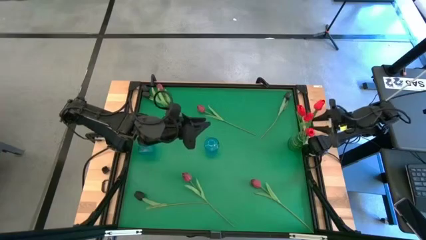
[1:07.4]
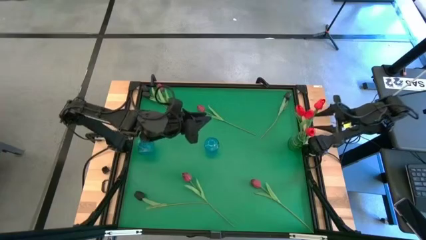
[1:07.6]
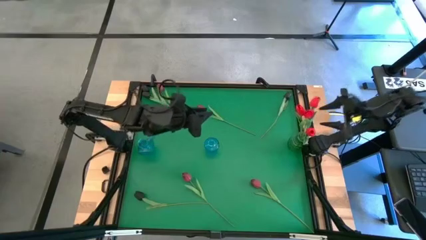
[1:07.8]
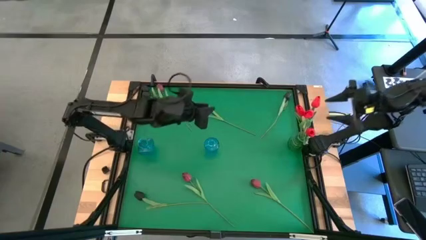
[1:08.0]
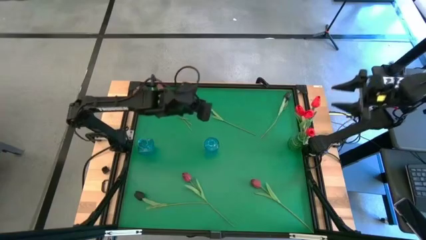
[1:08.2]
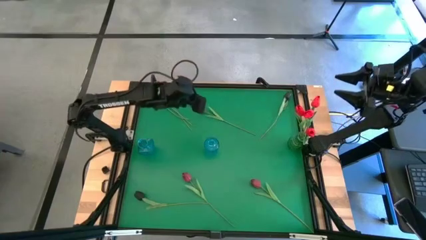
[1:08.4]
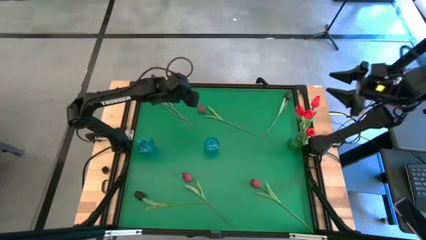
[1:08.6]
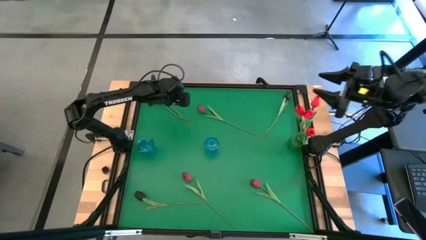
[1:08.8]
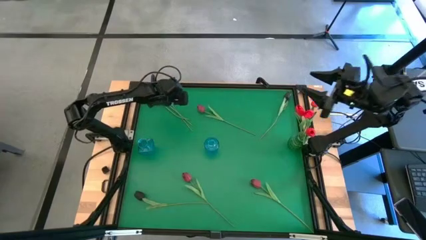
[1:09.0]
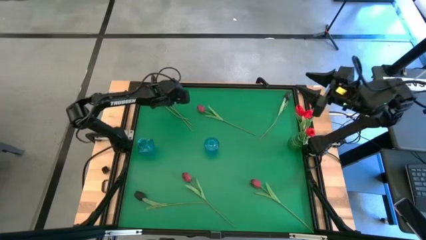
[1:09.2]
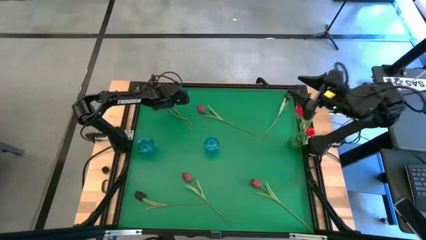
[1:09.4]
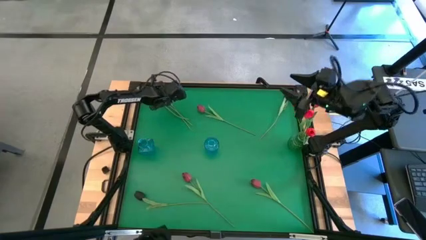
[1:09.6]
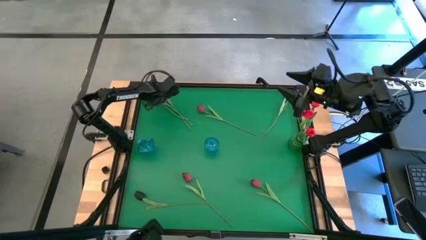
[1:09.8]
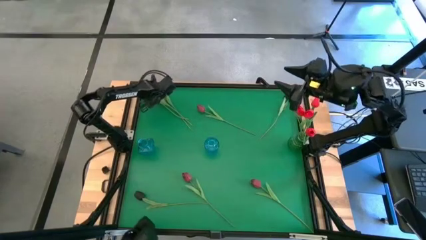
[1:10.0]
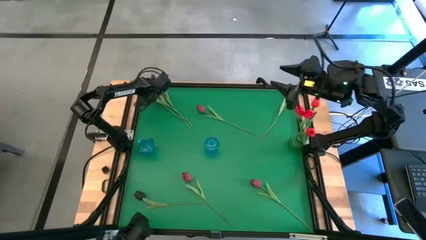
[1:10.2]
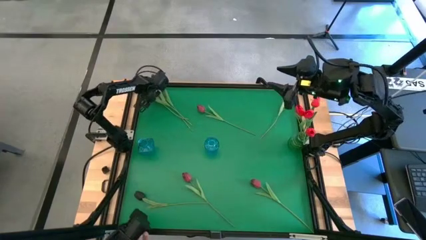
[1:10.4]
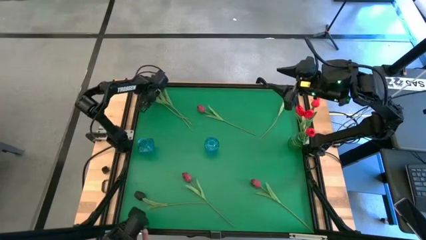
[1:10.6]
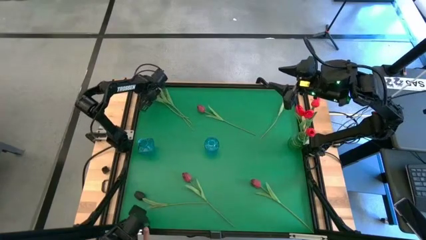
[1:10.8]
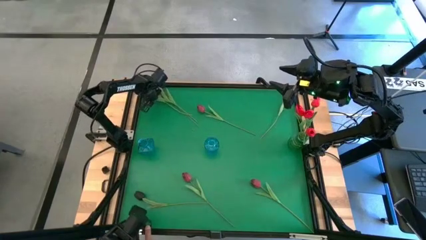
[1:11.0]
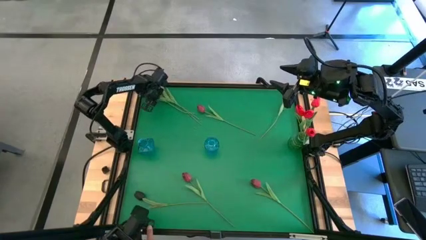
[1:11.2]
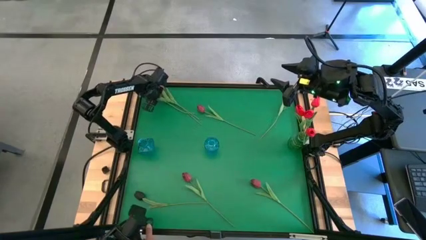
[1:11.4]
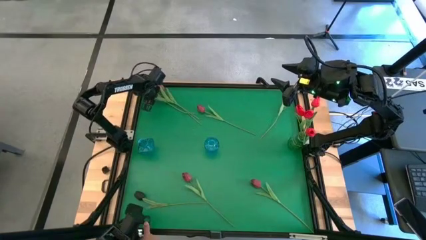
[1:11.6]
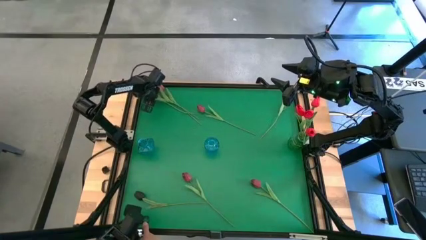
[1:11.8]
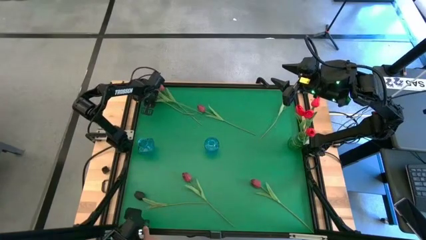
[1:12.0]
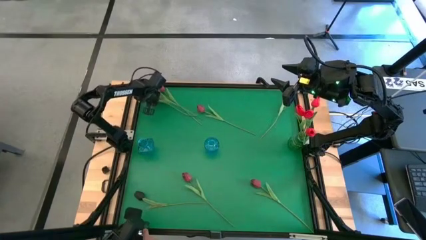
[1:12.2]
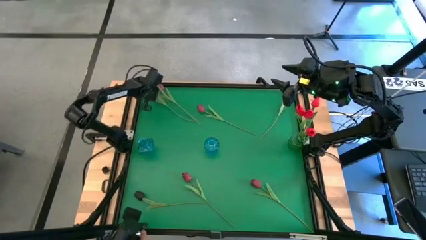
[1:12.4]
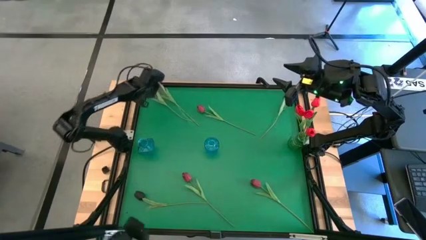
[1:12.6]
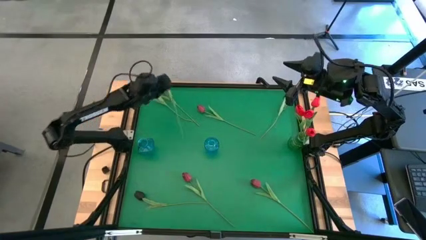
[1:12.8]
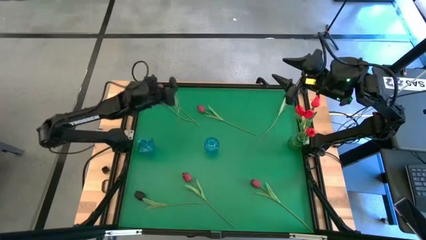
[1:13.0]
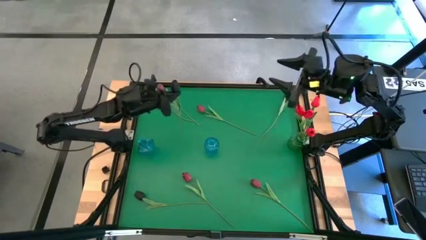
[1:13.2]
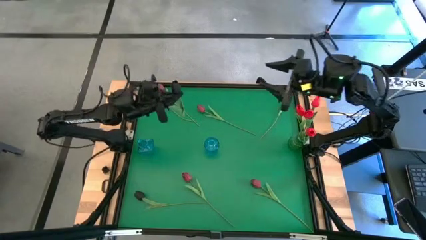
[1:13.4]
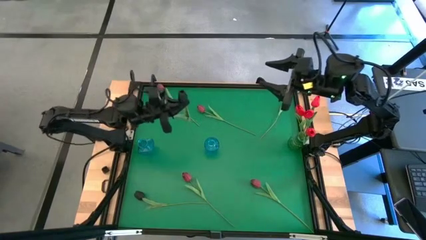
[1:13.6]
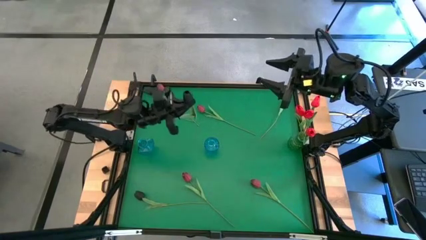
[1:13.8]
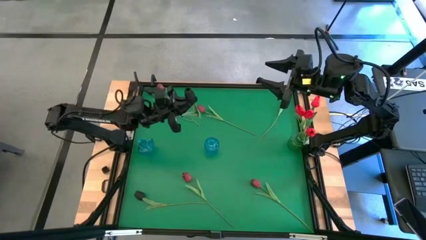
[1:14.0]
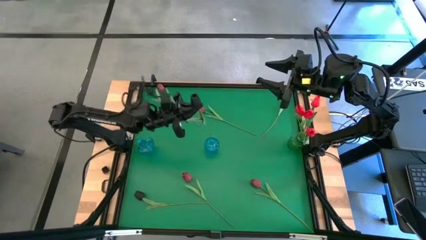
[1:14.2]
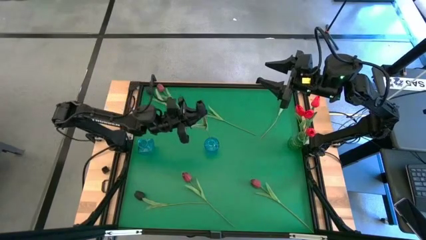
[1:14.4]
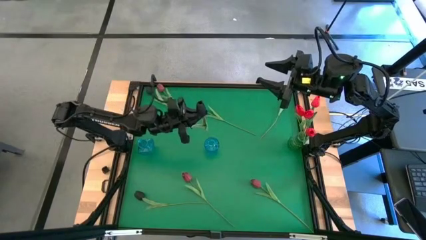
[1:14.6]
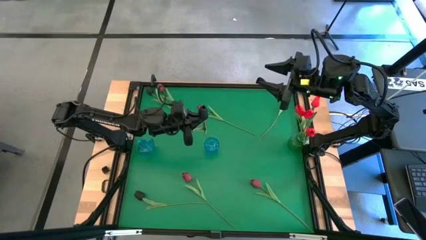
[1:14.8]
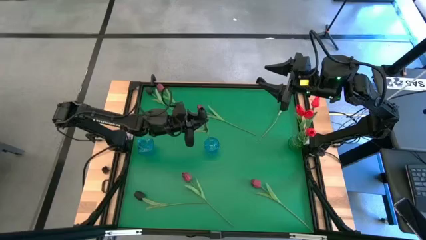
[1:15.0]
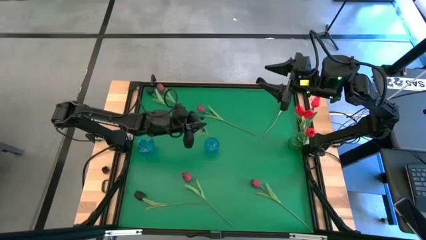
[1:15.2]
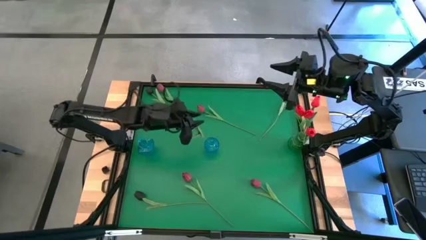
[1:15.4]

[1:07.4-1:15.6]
Task: Sort flowers into vase by color
Put the black flower into the right blue flower vase

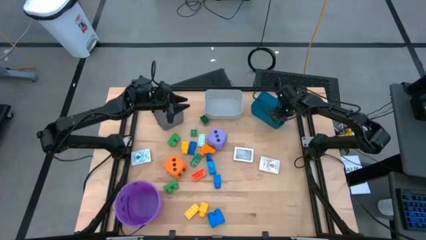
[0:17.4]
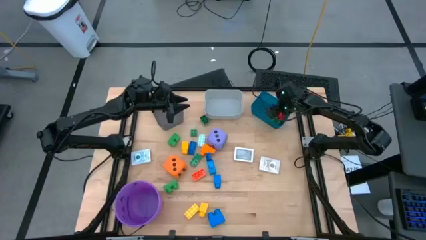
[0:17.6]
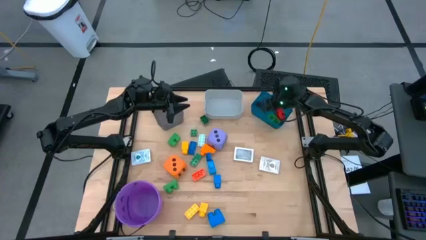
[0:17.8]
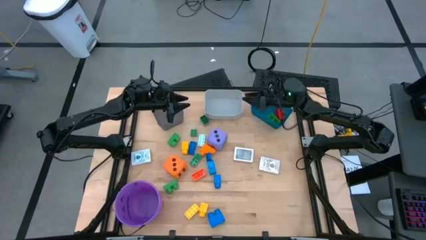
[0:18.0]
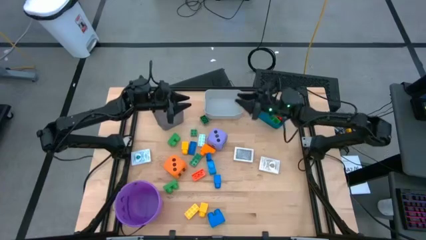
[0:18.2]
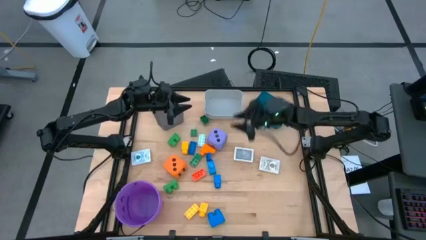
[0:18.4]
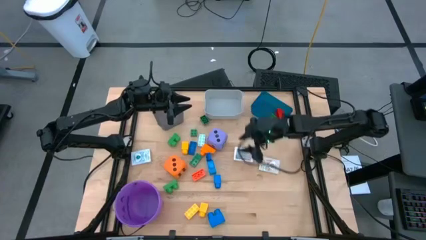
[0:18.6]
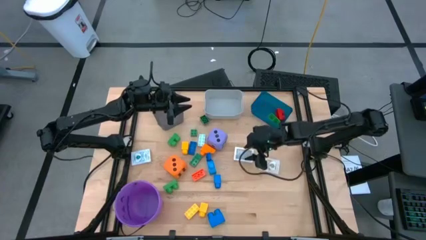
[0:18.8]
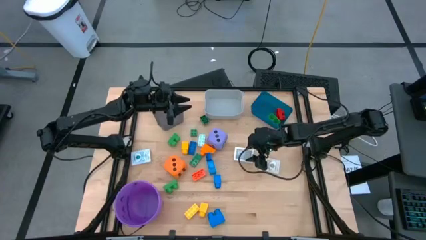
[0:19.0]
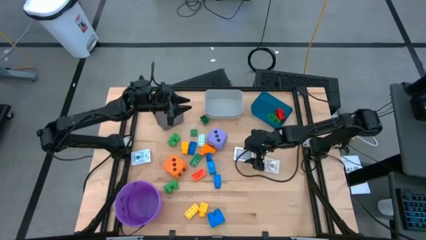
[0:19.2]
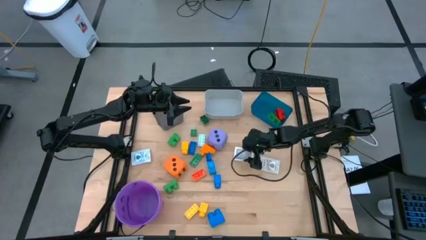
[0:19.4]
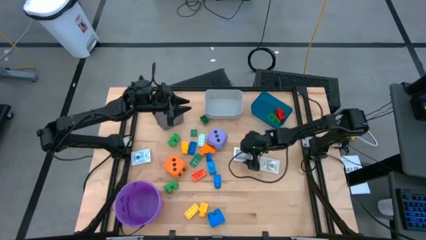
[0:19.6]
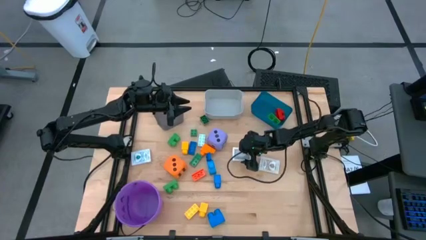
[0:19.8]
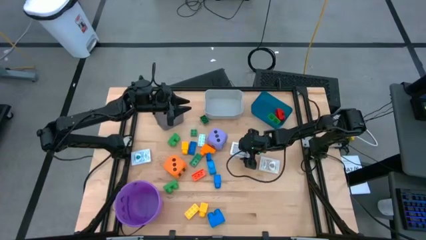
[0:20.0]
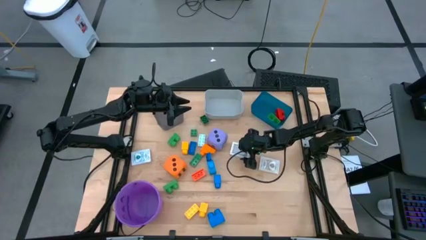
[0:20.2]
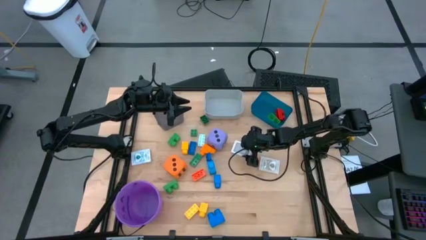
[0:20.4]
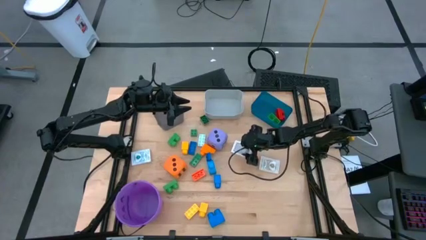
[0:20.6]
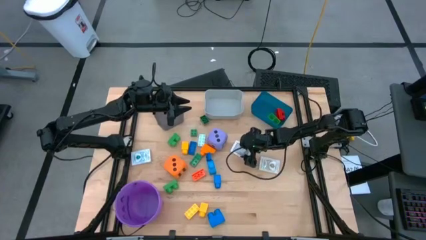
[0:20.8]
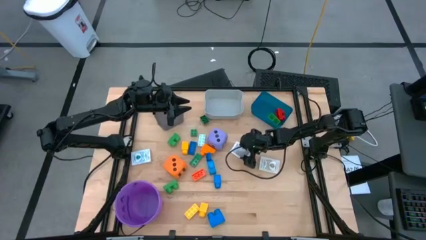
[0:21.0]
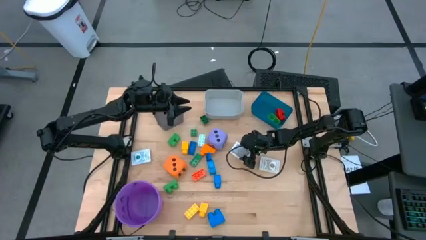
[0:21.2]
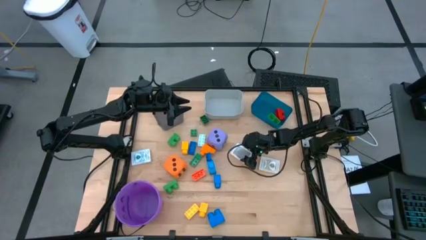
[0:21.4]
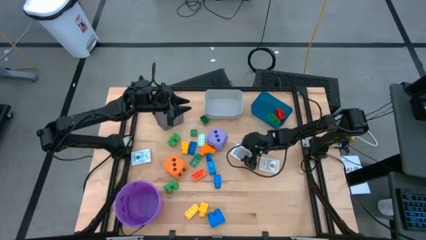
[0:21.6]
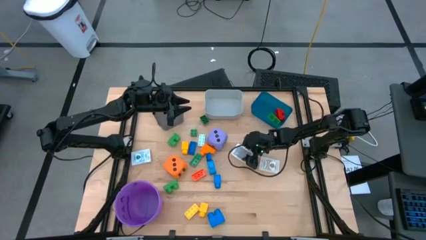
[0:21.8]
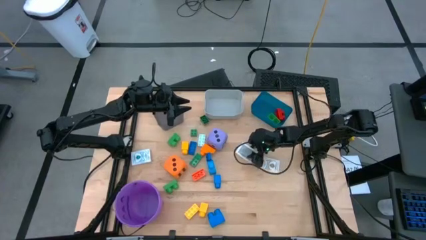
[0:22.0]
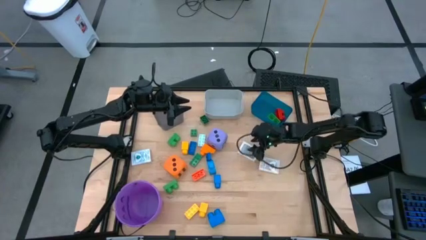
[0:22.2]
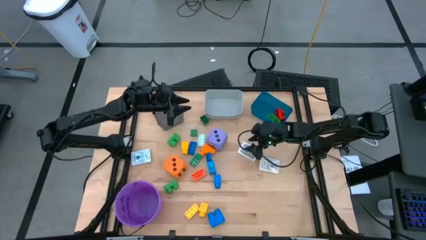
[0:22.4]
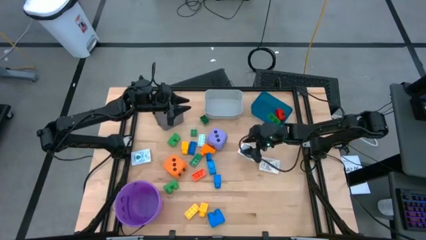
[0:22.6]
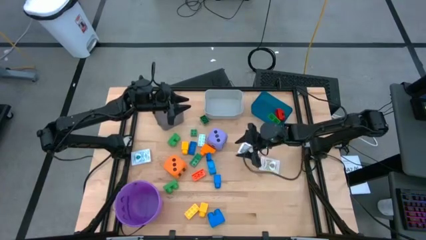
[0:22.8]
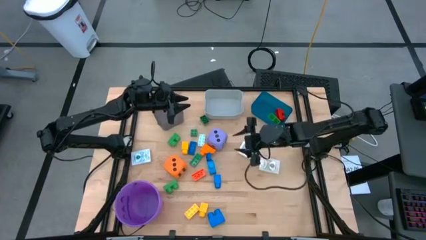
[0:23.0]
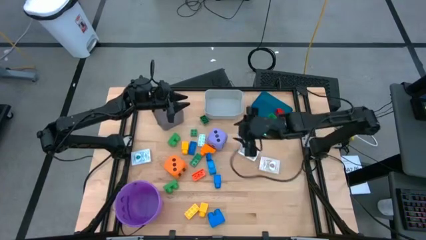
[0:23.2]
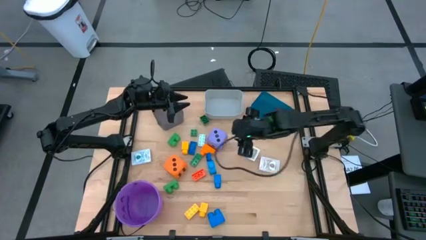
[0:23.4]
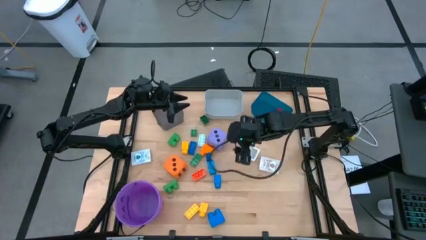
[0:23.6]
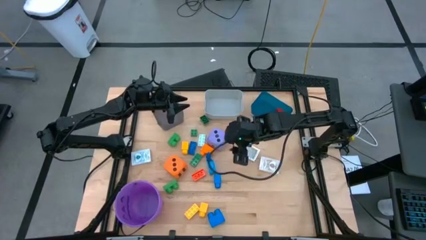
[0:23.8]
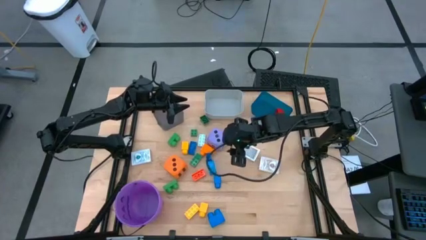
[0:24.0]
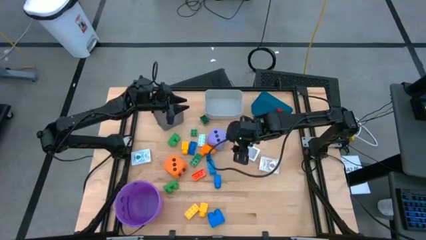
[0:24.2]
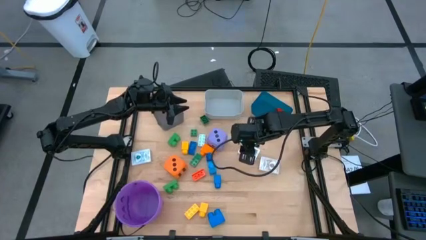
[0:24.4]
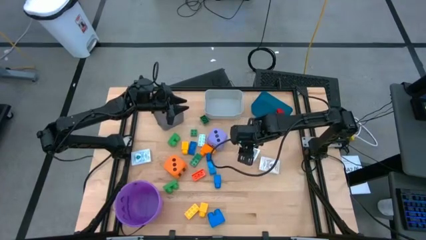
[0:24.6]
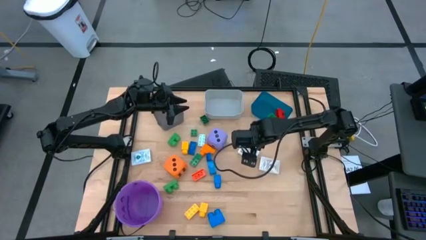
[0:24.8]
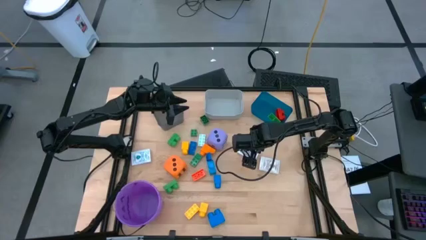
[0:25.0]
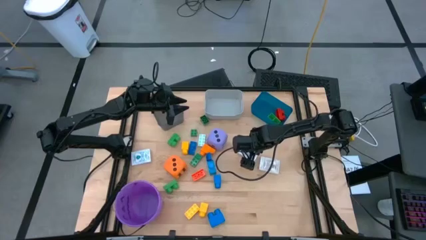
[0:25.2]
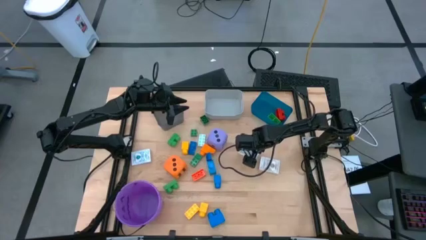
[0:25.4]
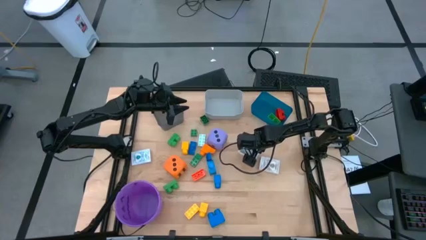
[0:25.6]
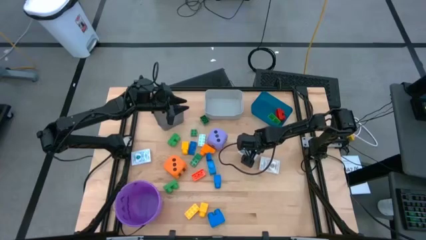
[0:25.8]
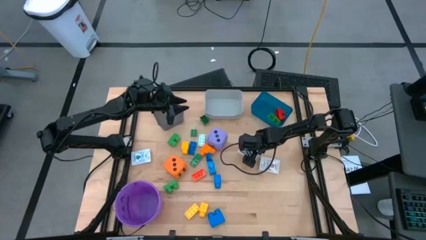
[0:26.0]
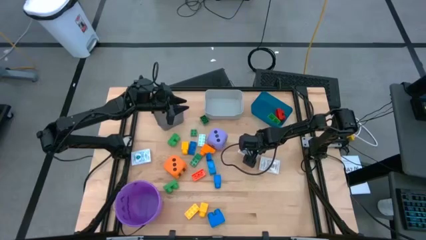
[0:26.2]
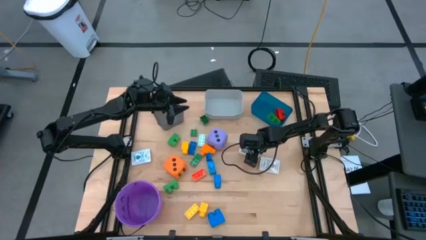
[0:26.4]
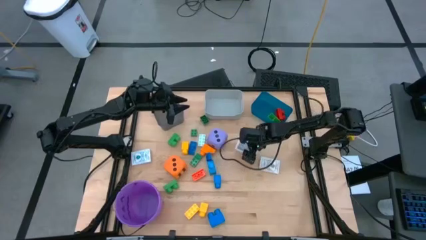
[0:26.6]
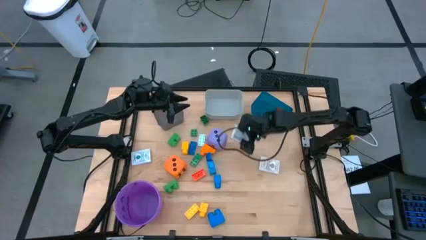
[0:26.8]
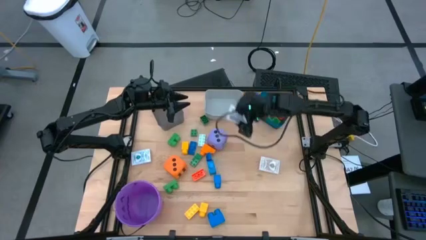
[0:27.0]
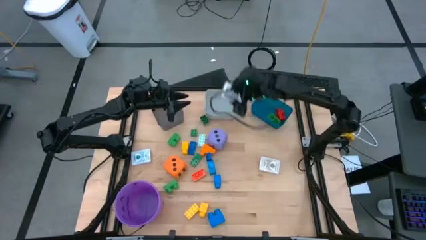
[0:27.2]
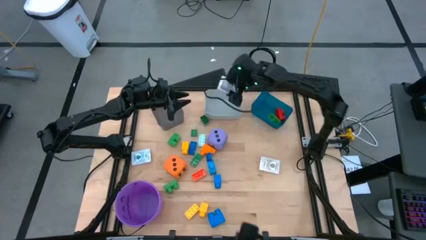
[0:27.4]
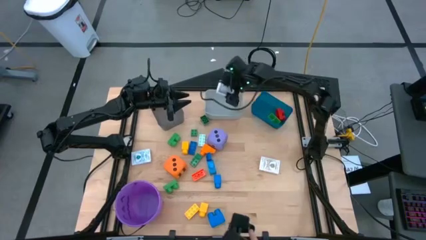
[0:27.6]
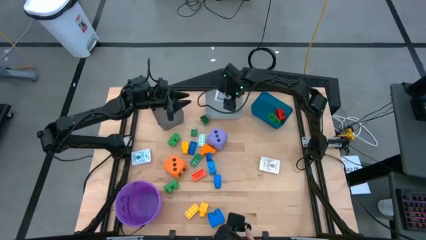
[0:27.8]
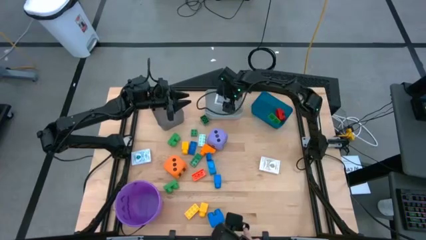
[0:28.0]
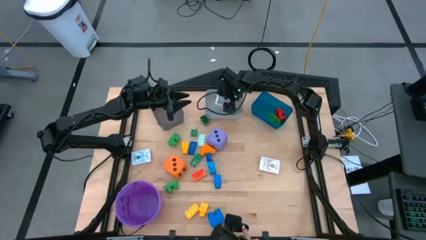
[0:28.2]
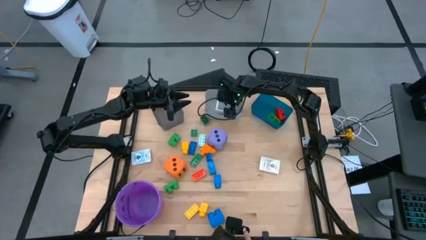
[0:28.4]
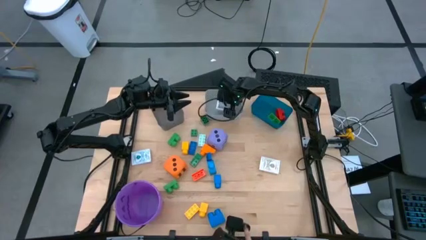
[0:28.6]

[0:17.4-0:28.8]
Task: Pick & Place Toys
Put the black deck of cards into the gray bin
